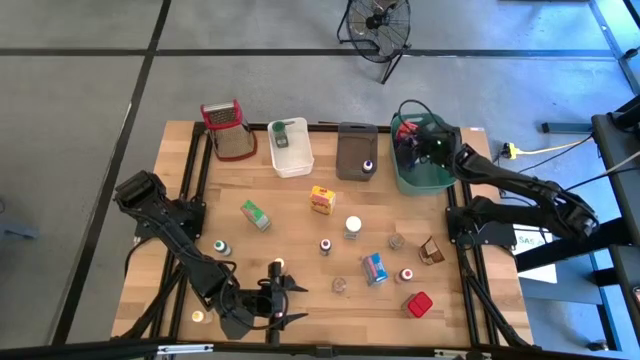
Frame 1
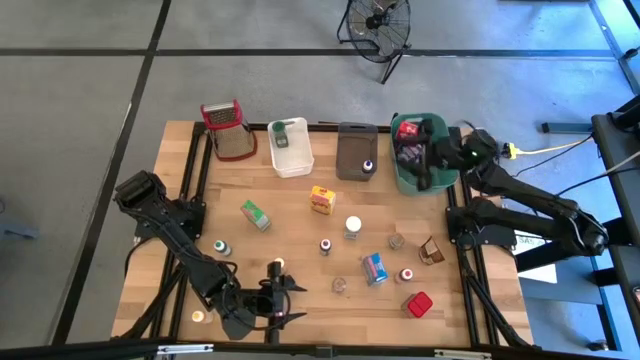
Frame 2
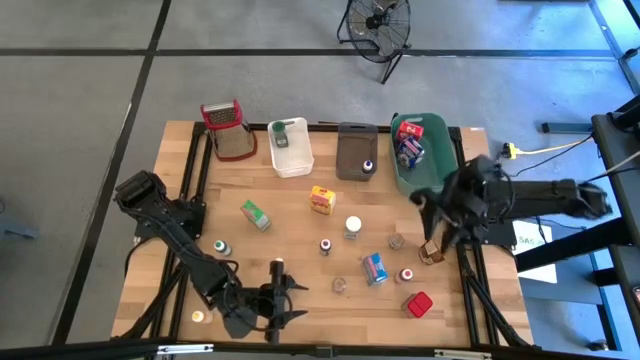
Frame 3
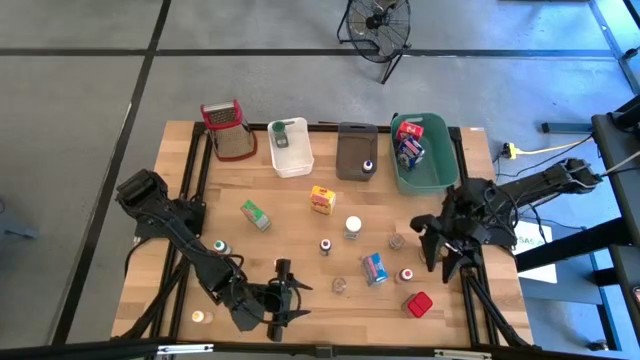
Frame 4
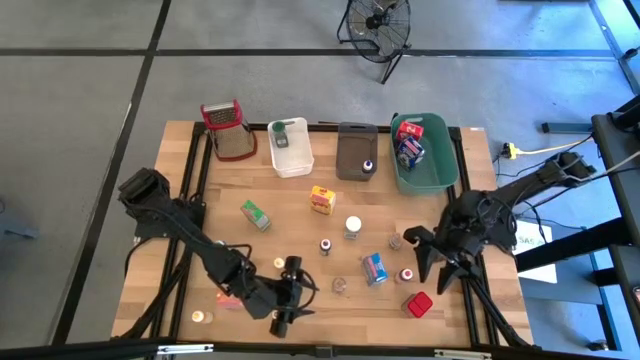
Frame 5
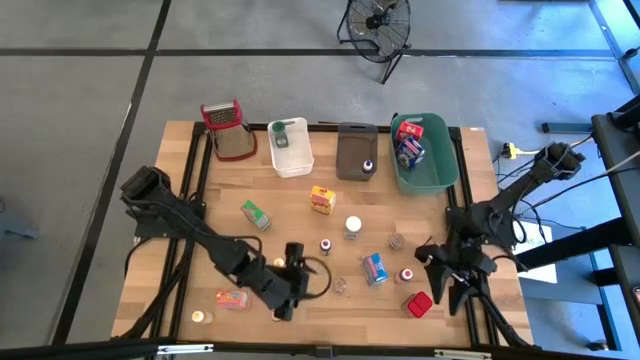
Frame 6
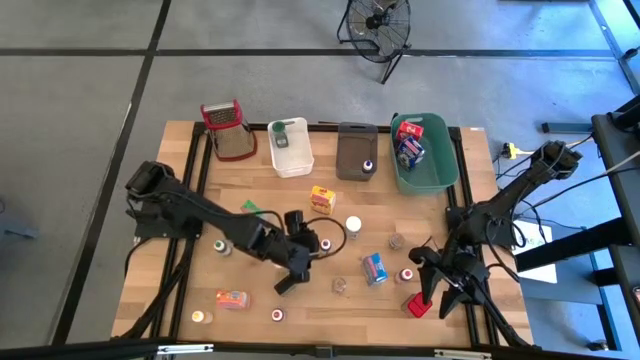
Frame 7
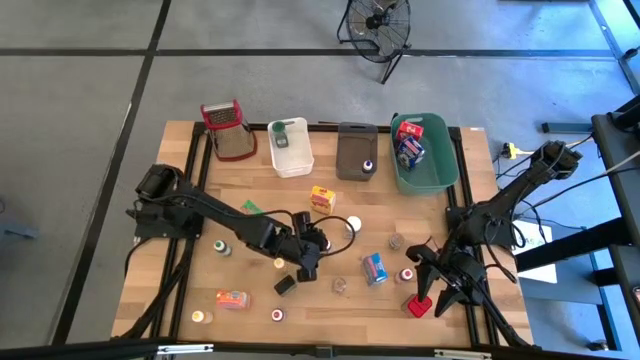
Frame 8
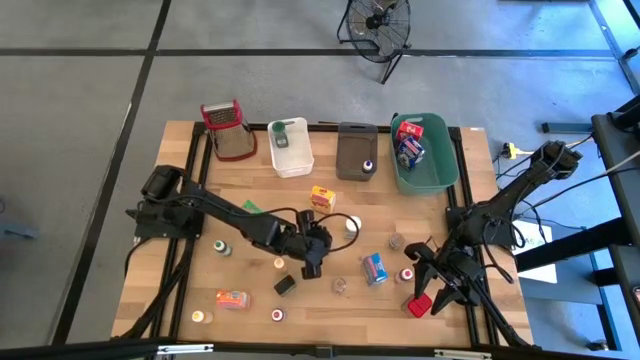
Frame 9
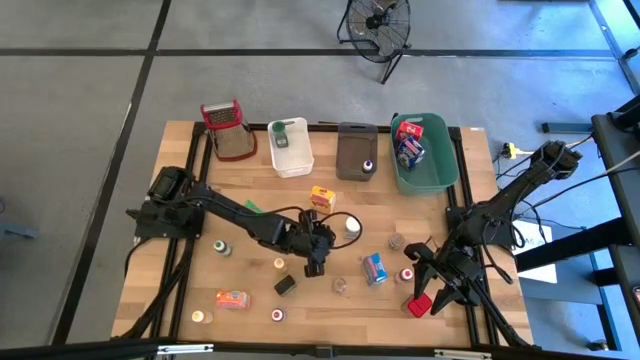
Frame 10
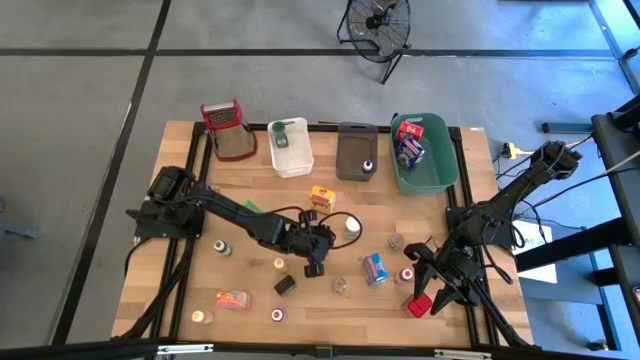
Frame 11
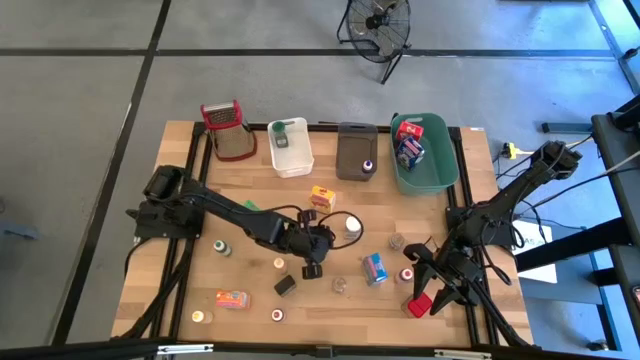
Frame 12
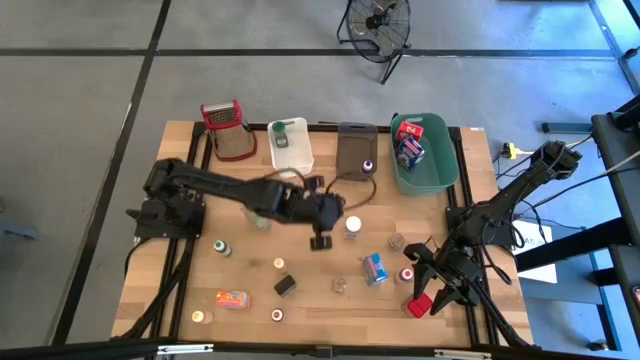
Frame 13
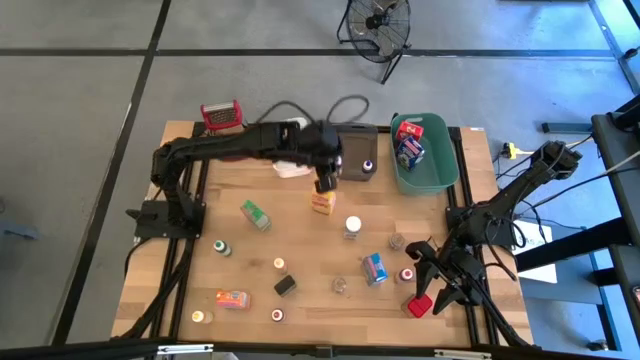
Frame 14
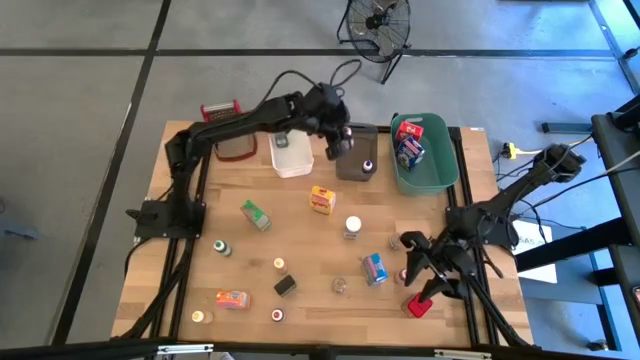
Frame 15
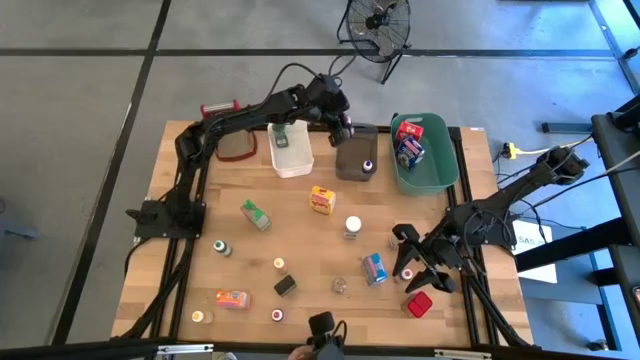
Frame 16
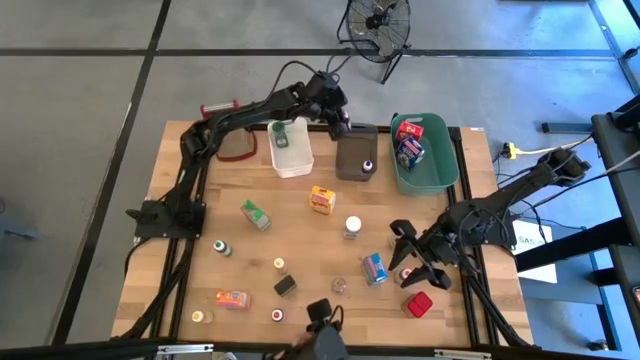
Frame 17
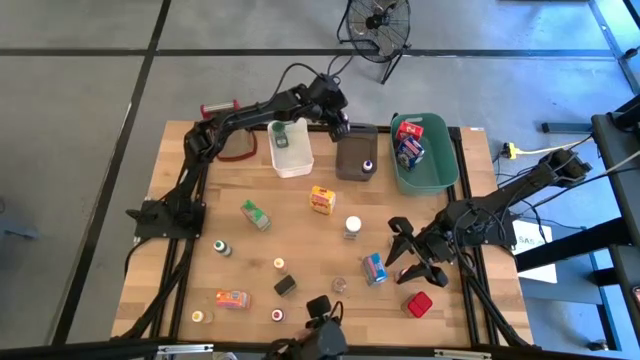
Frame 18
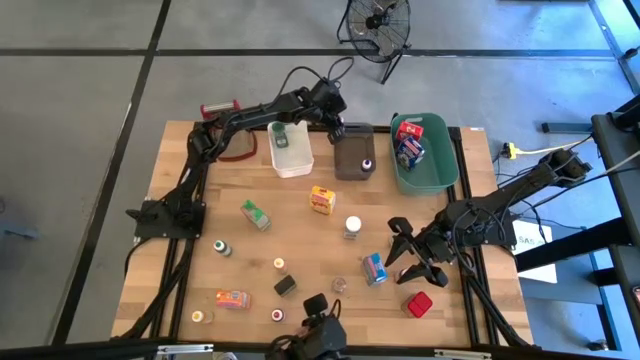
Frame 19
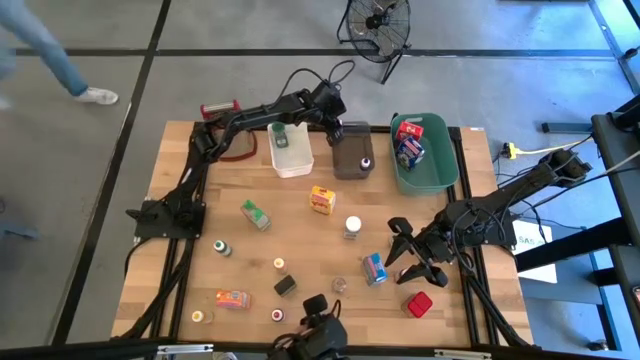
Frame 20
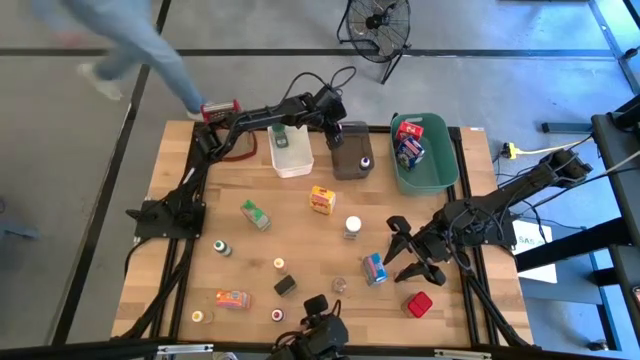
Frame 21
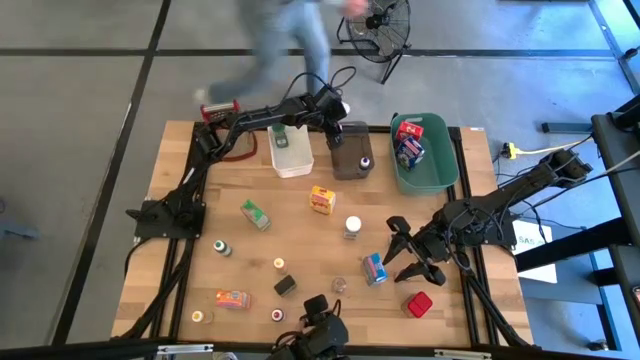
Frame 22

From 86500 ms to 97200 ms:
Task: Pick & Place Kitchen Items
Put the purple food coloring bottle into the black transparent bin

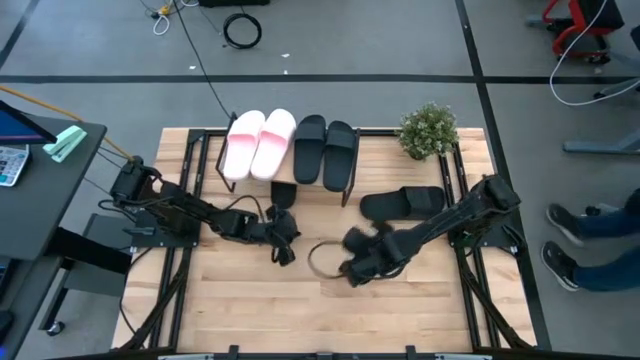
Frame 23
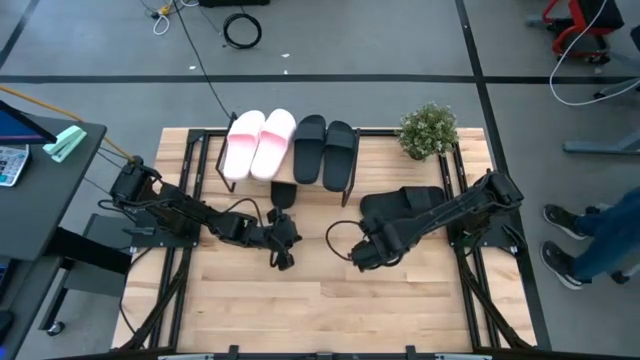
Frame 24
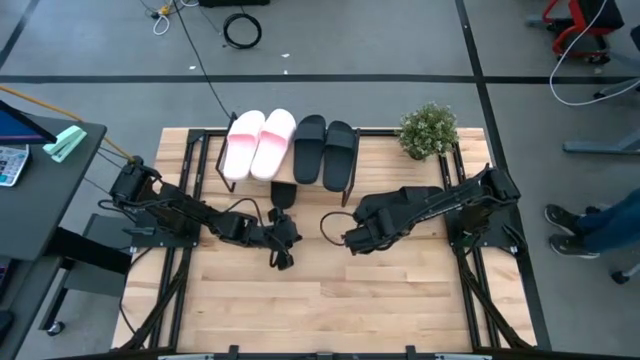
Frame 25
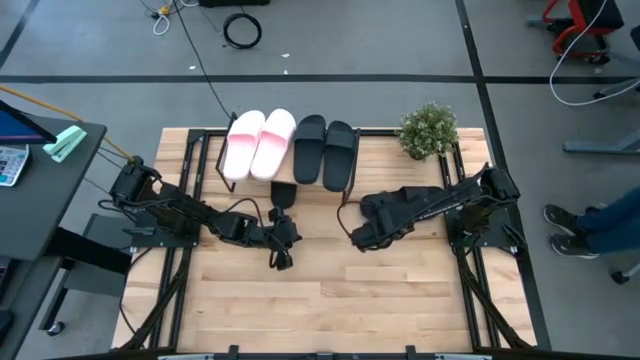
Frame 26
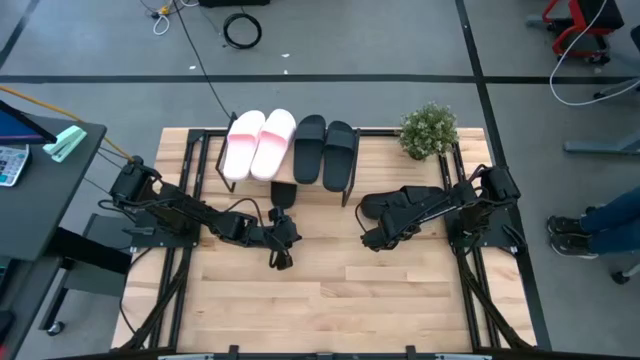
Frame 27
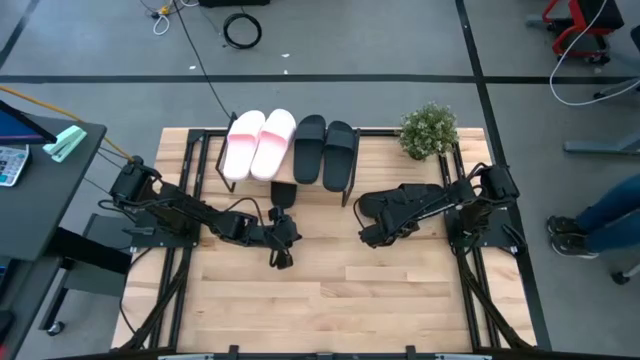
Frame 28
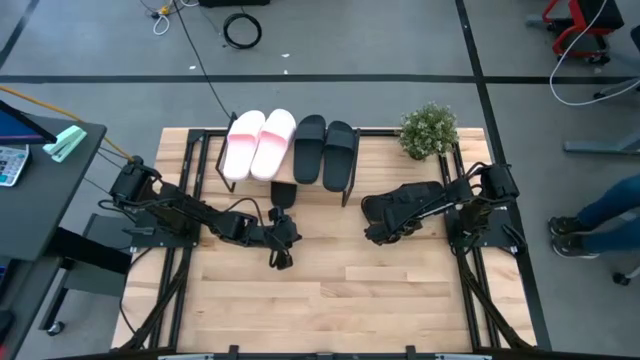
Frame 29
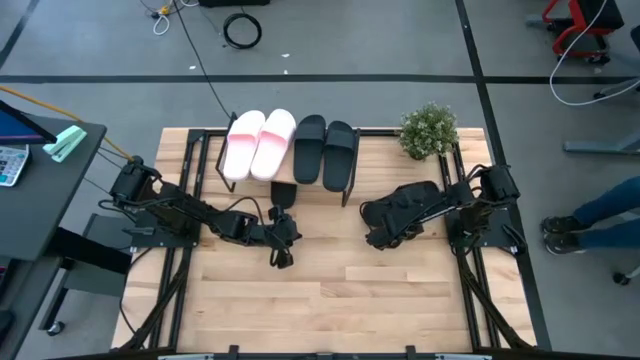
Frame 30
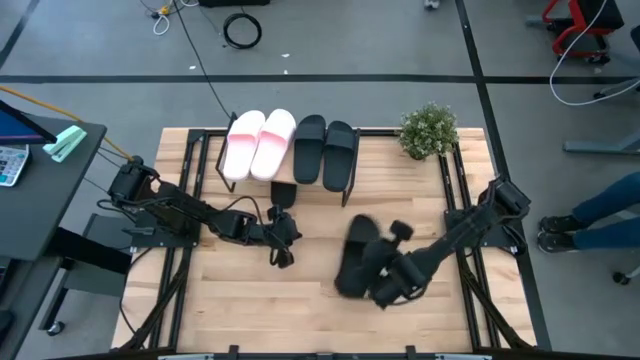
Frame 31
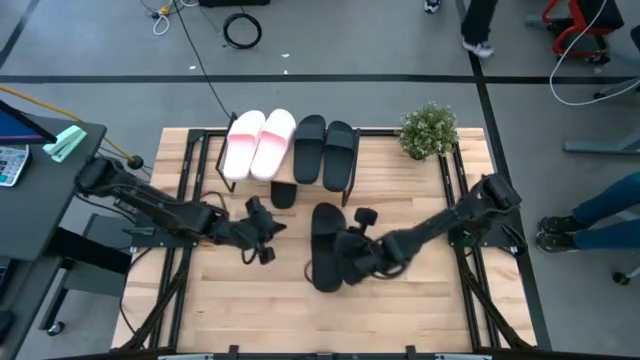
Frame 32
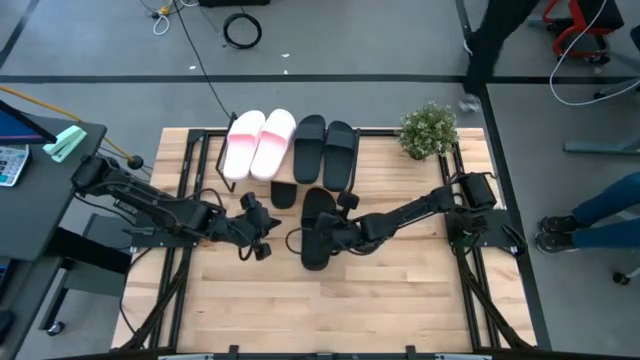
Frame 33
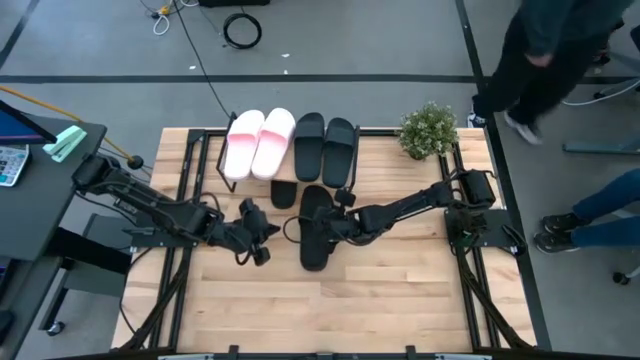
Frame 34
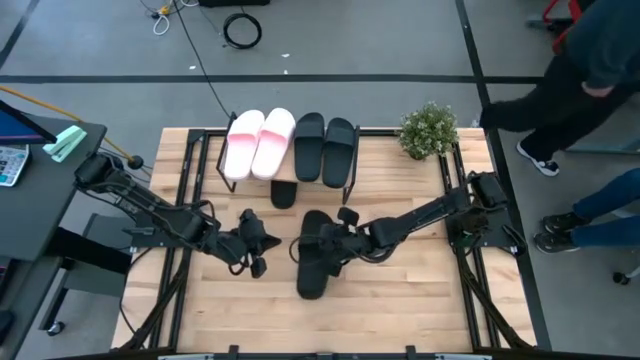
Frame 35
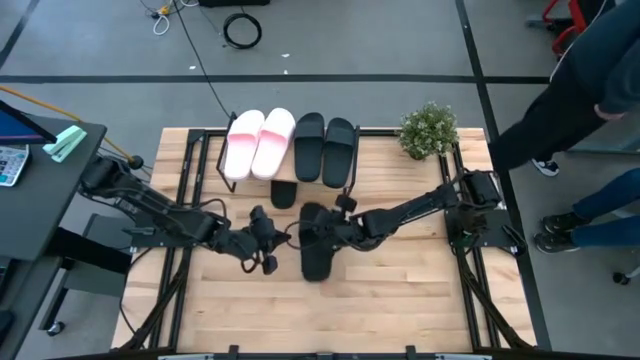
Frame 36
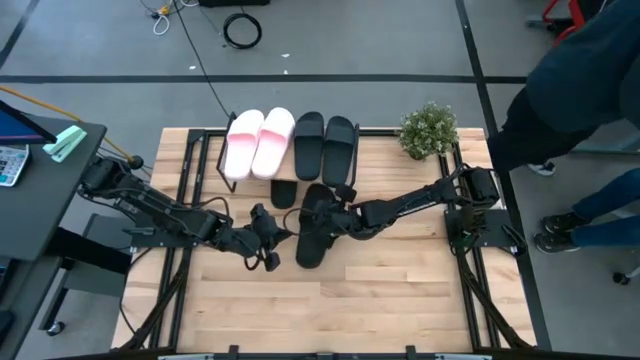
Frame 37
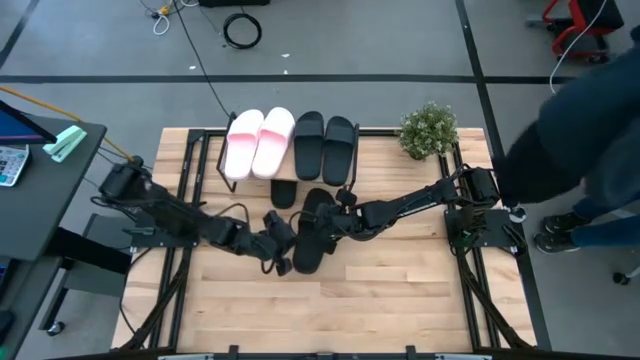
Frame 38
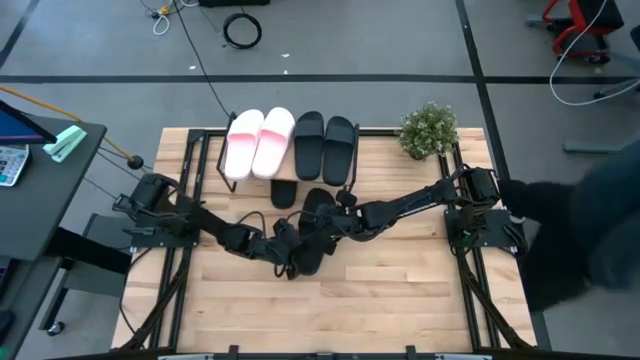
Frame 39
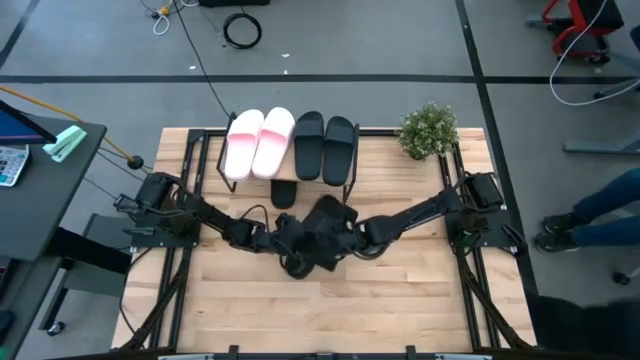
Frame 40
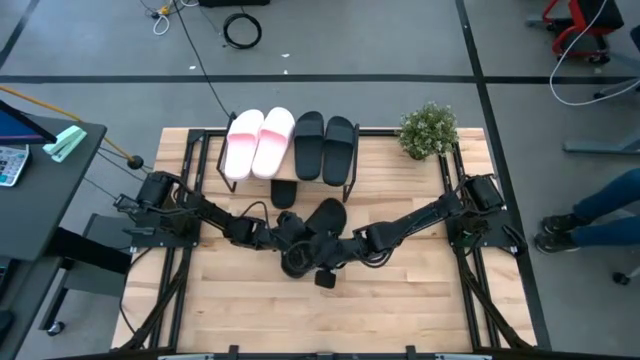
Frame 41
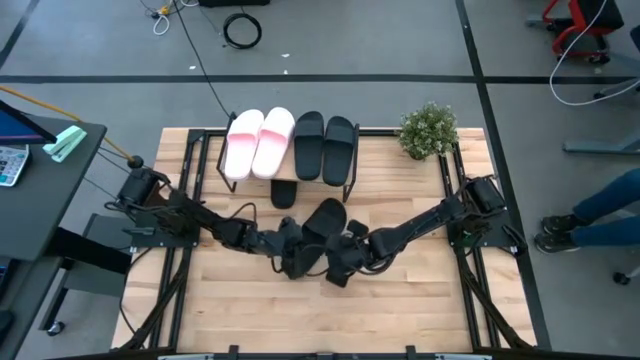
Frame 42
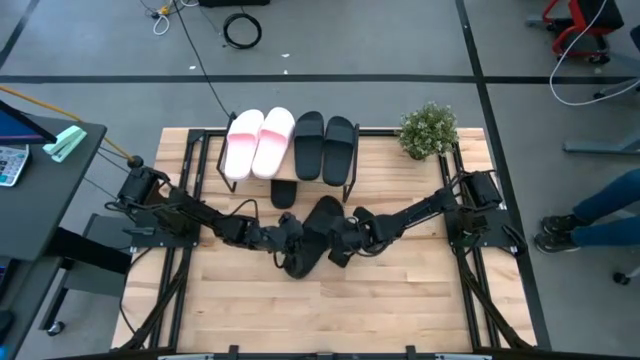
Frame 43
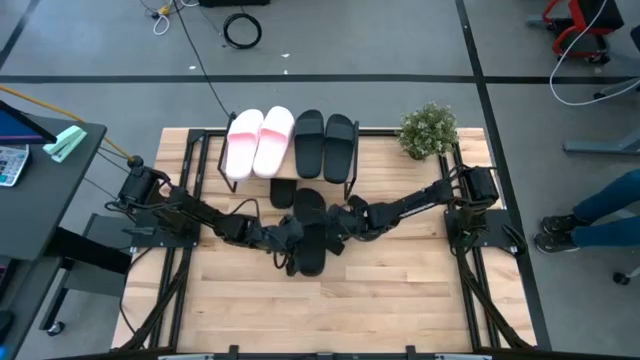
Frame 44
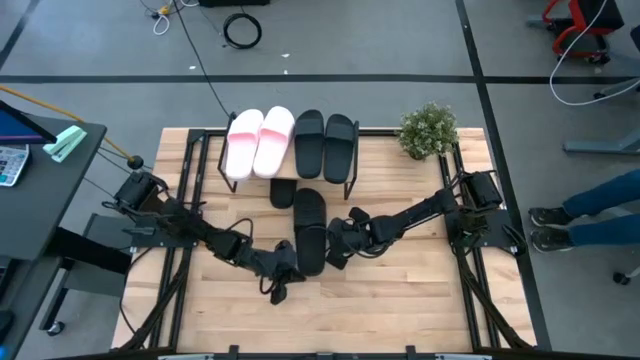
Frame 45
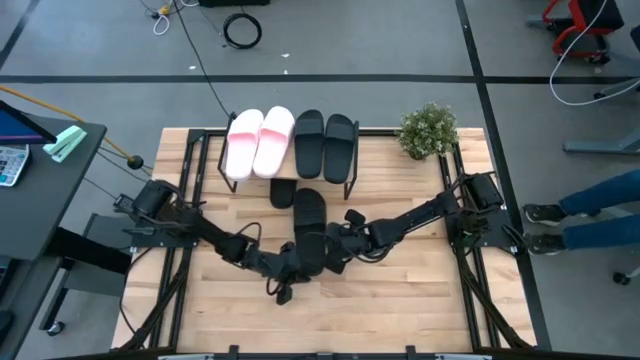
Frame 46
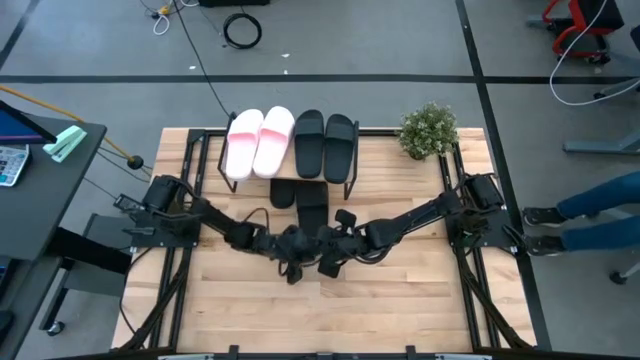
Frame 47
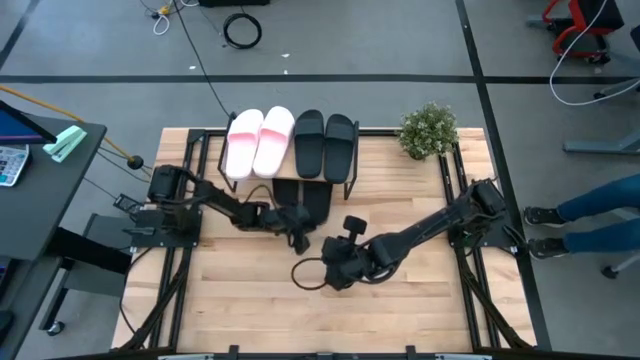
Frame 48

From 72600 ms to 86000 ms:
Task: Pick and place slides into the shelf
Put the black slide under the shelf
